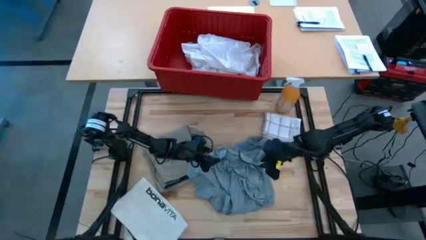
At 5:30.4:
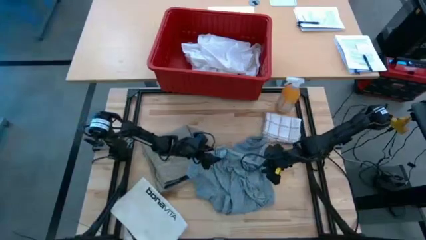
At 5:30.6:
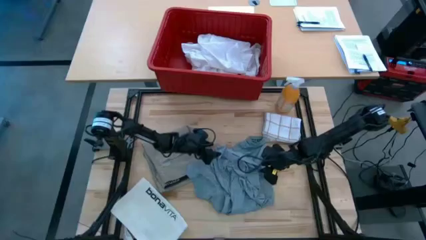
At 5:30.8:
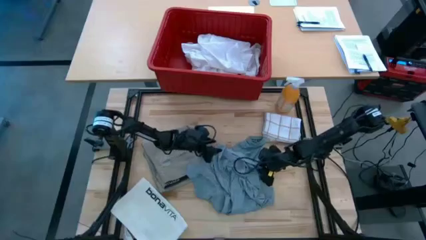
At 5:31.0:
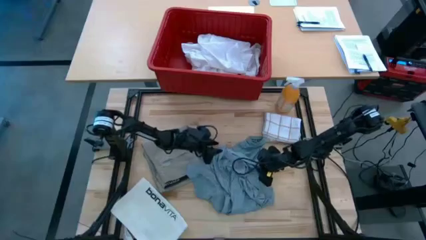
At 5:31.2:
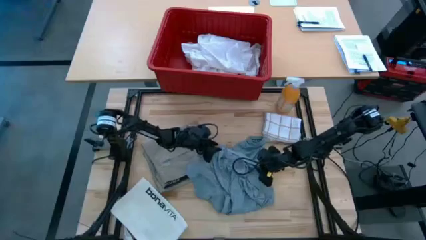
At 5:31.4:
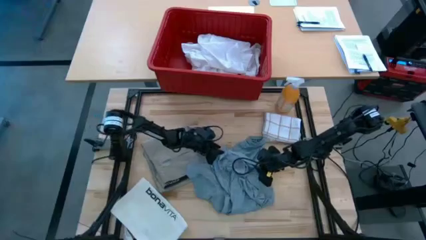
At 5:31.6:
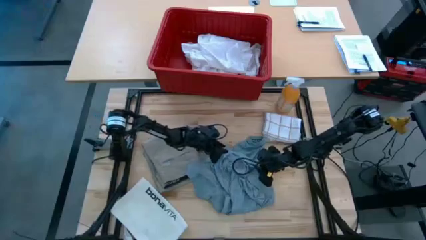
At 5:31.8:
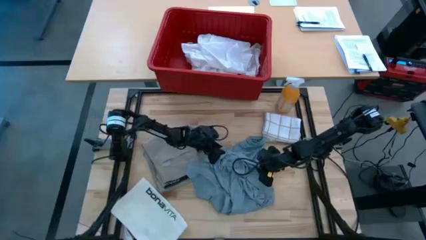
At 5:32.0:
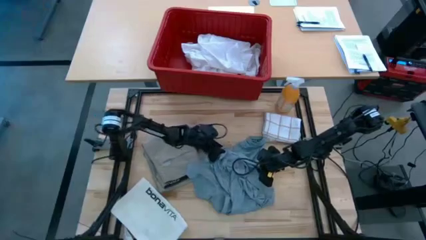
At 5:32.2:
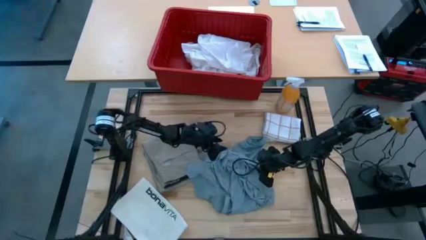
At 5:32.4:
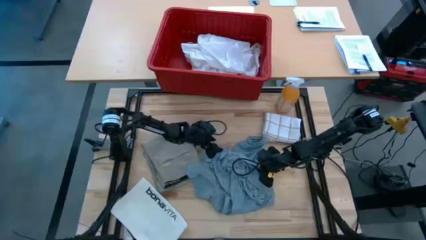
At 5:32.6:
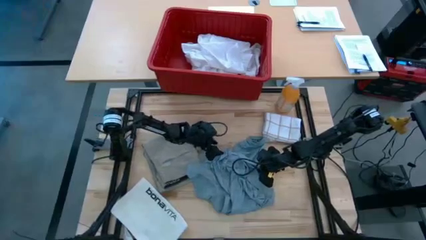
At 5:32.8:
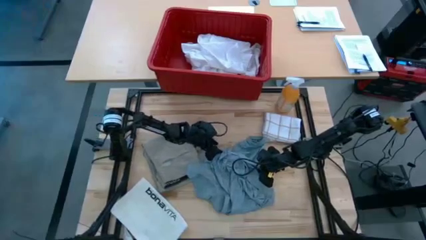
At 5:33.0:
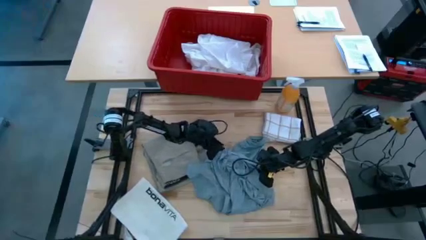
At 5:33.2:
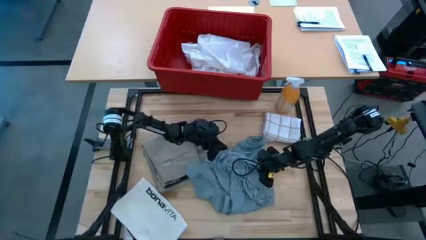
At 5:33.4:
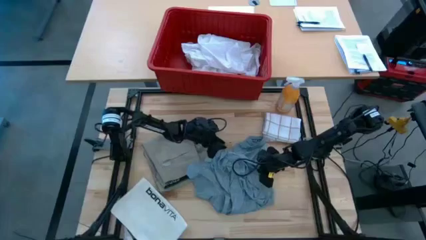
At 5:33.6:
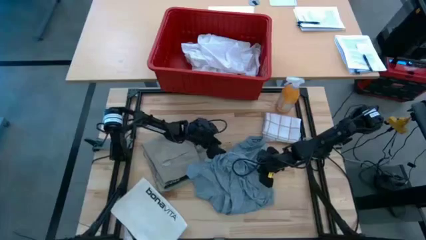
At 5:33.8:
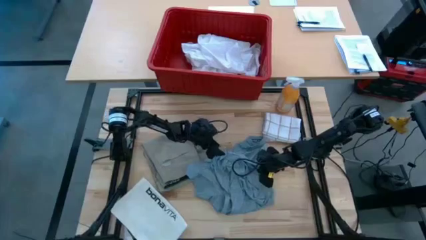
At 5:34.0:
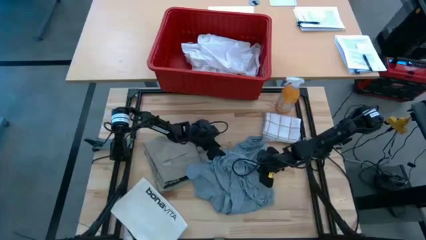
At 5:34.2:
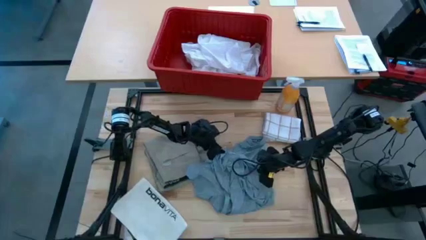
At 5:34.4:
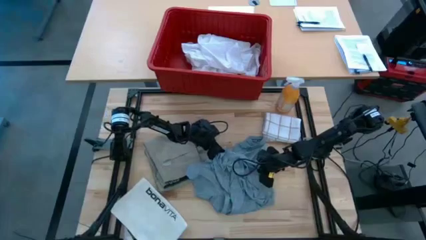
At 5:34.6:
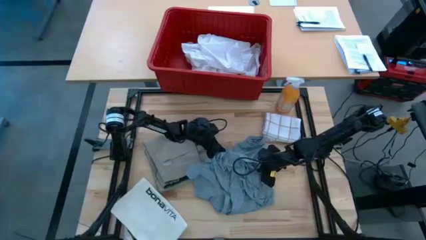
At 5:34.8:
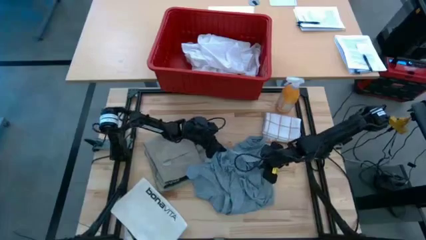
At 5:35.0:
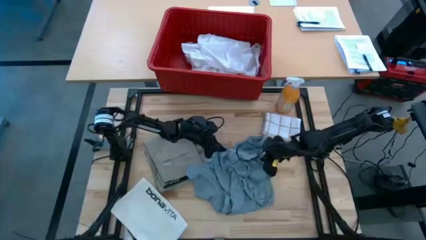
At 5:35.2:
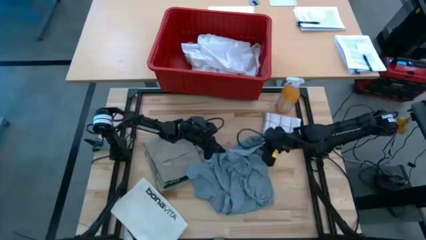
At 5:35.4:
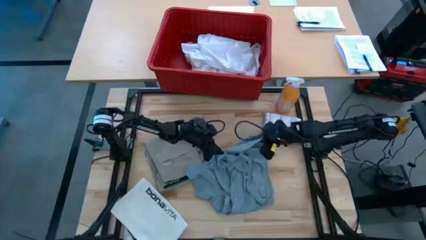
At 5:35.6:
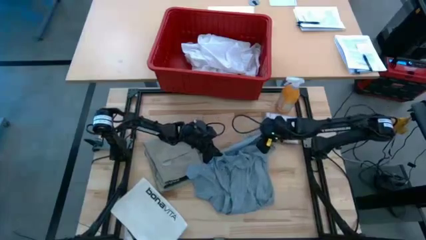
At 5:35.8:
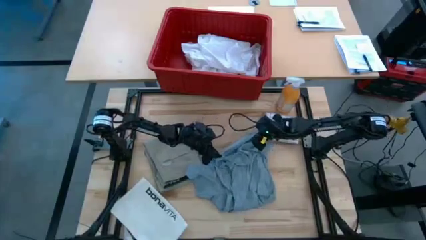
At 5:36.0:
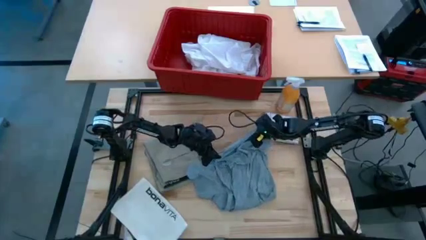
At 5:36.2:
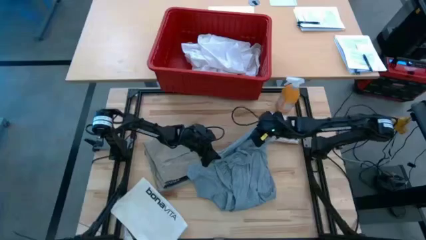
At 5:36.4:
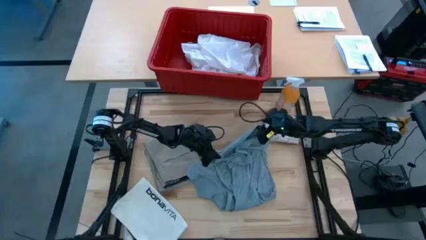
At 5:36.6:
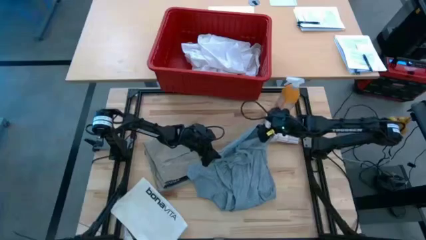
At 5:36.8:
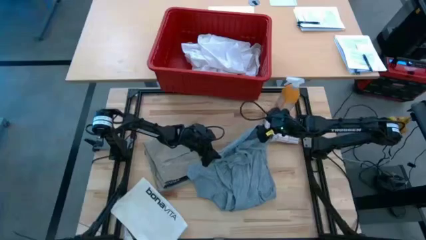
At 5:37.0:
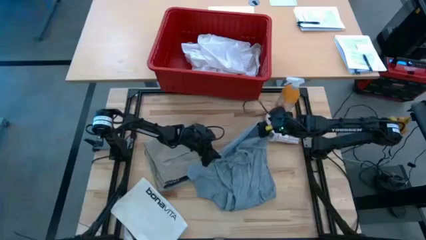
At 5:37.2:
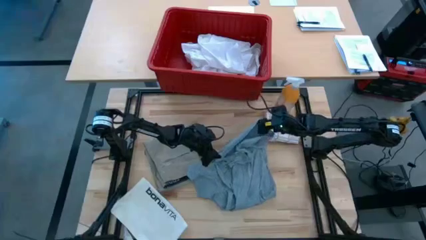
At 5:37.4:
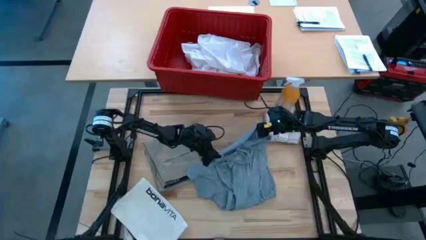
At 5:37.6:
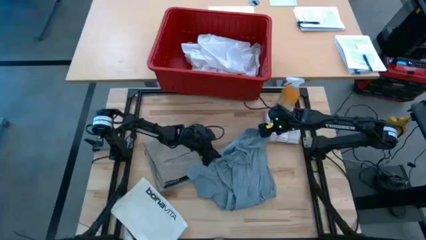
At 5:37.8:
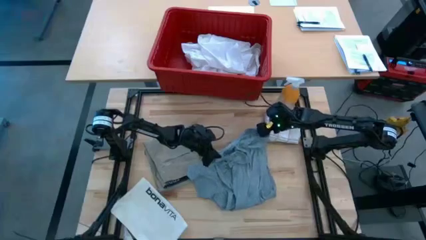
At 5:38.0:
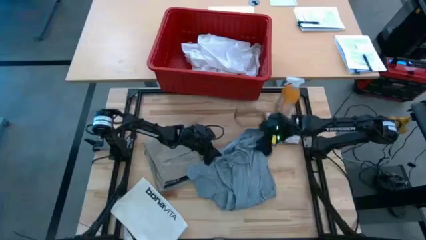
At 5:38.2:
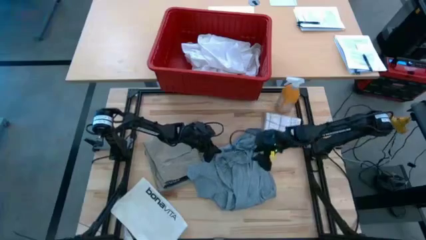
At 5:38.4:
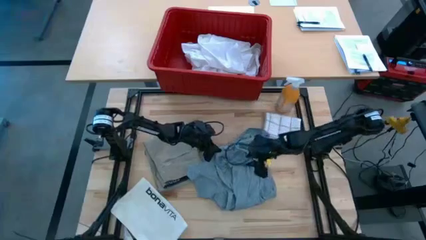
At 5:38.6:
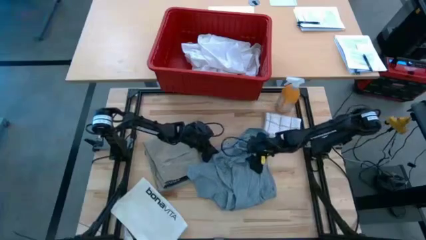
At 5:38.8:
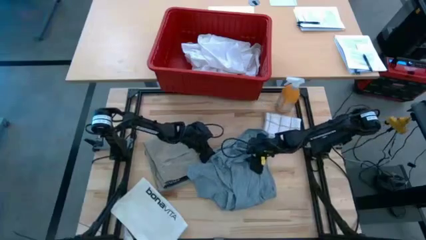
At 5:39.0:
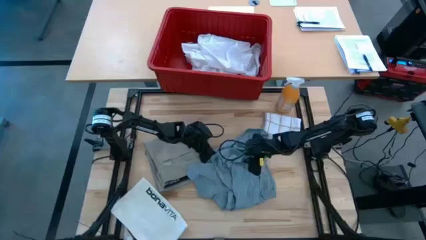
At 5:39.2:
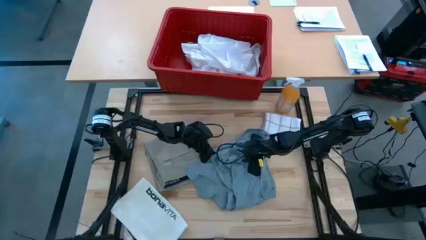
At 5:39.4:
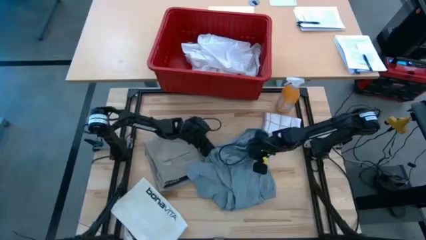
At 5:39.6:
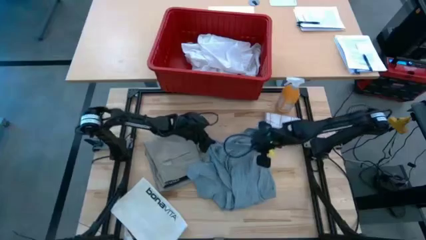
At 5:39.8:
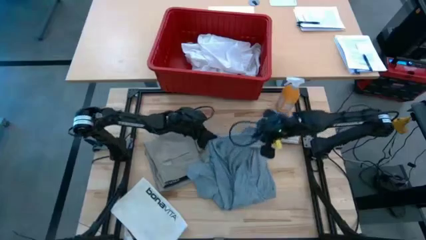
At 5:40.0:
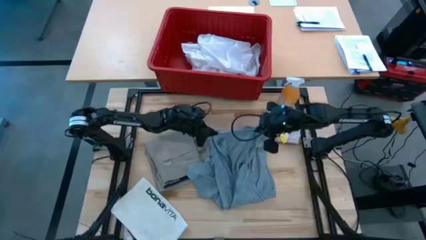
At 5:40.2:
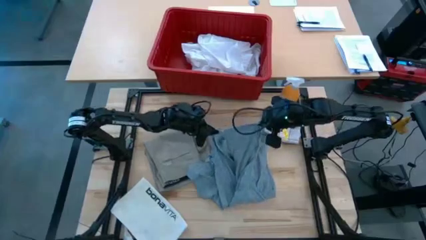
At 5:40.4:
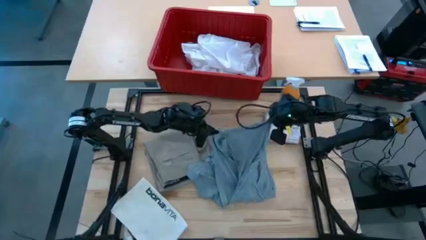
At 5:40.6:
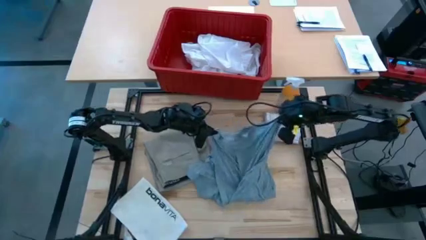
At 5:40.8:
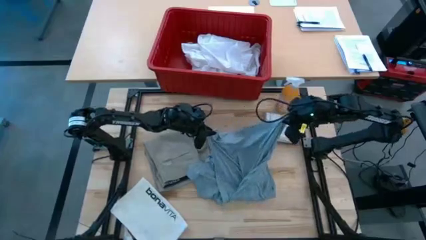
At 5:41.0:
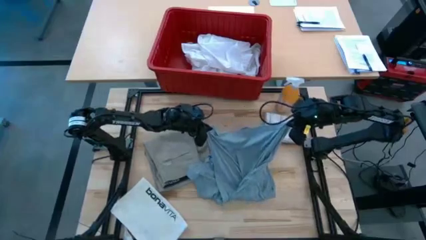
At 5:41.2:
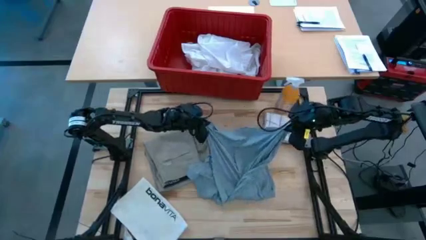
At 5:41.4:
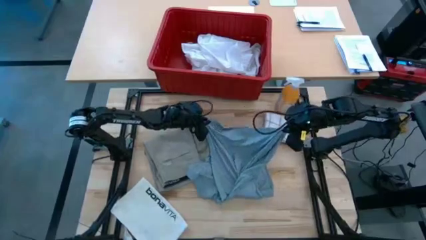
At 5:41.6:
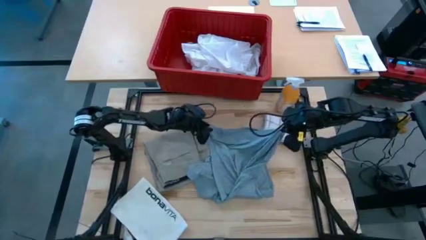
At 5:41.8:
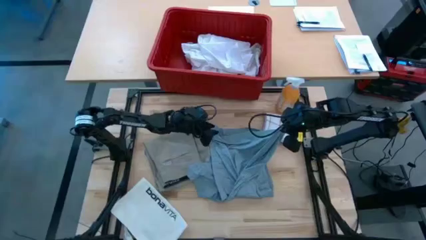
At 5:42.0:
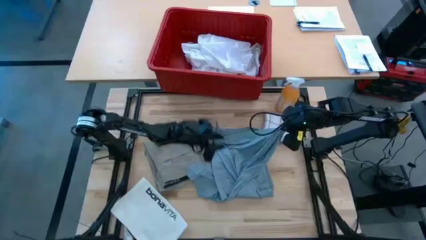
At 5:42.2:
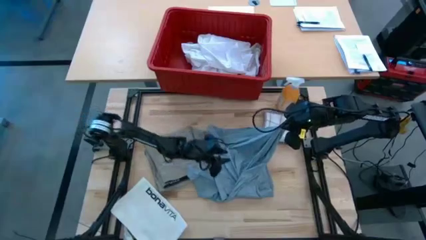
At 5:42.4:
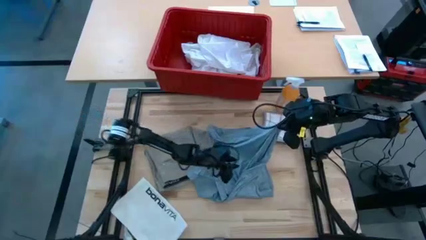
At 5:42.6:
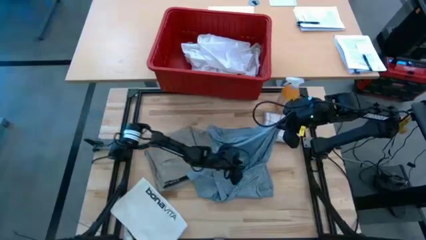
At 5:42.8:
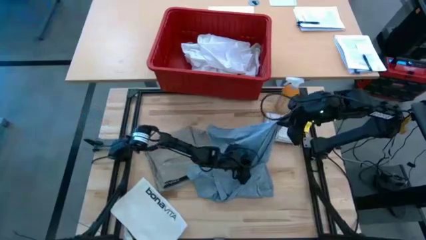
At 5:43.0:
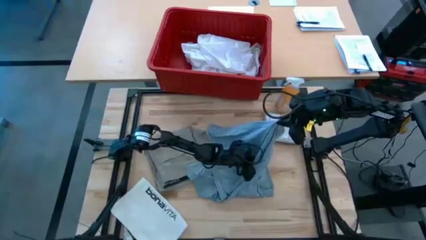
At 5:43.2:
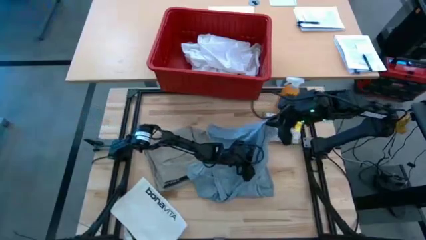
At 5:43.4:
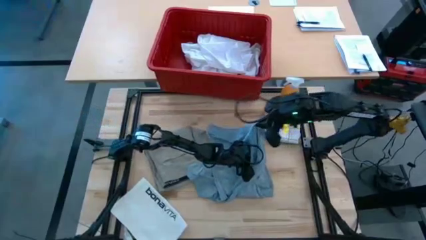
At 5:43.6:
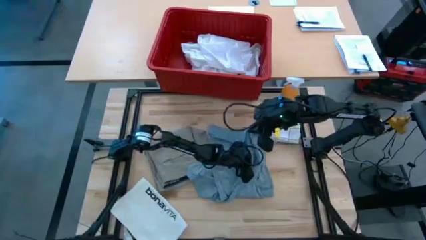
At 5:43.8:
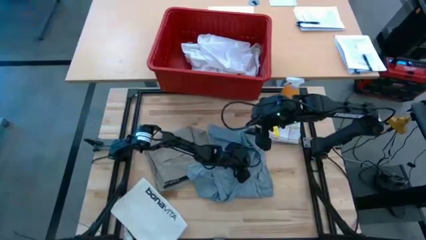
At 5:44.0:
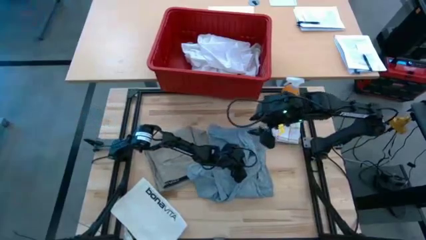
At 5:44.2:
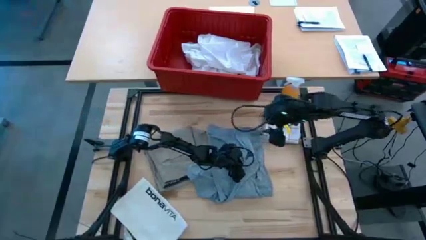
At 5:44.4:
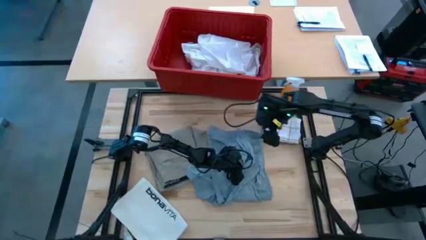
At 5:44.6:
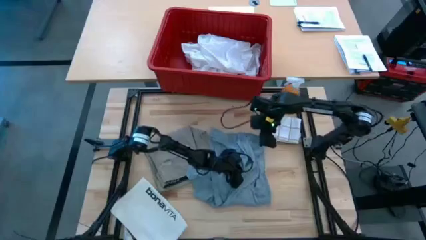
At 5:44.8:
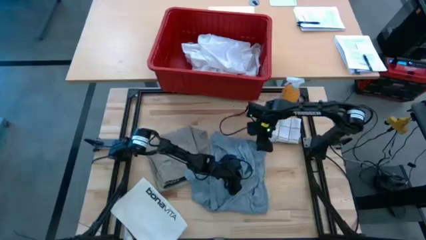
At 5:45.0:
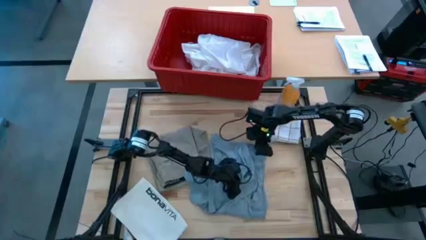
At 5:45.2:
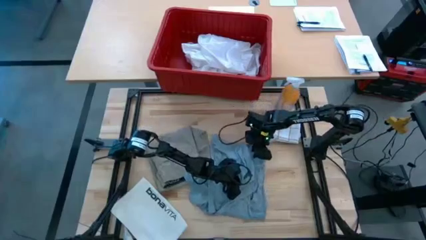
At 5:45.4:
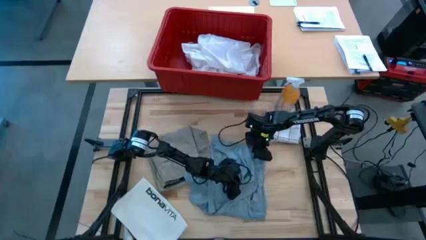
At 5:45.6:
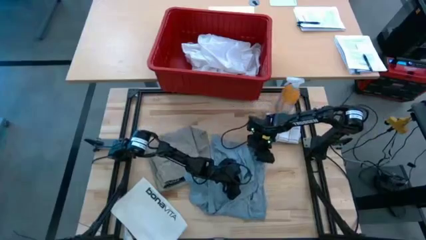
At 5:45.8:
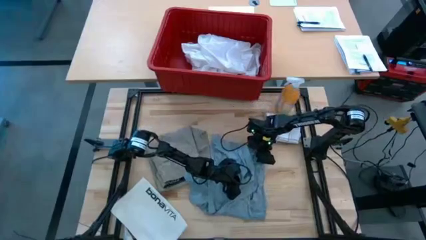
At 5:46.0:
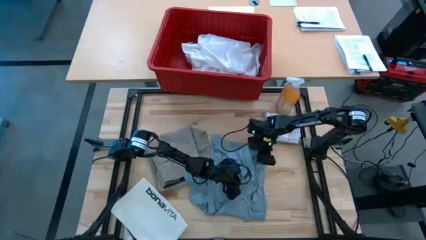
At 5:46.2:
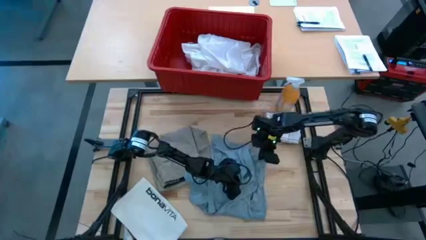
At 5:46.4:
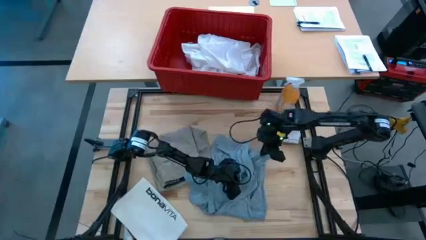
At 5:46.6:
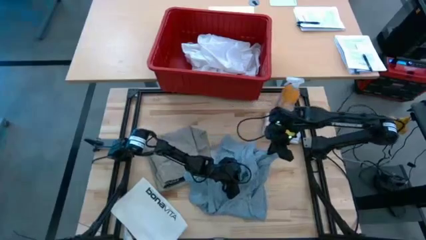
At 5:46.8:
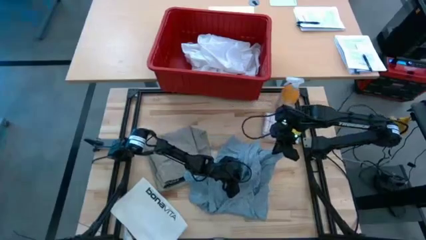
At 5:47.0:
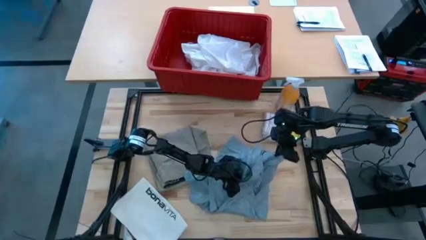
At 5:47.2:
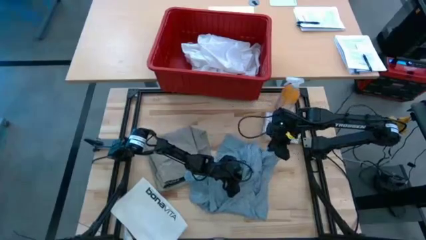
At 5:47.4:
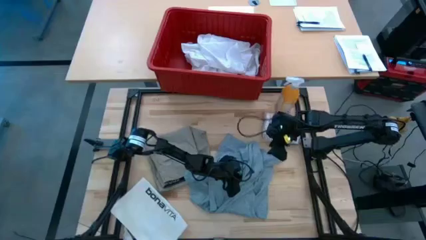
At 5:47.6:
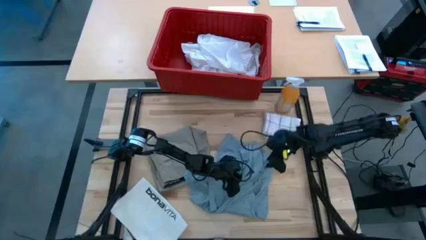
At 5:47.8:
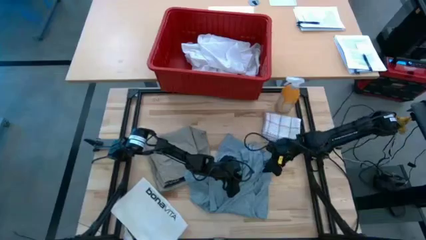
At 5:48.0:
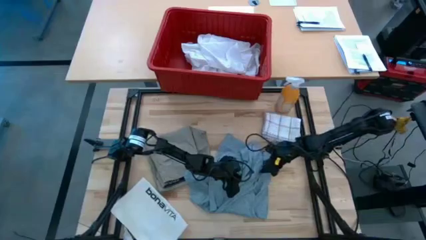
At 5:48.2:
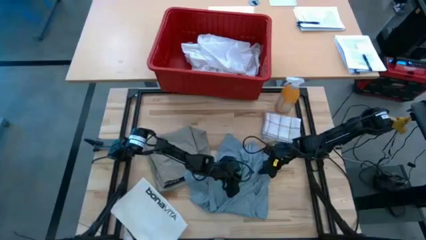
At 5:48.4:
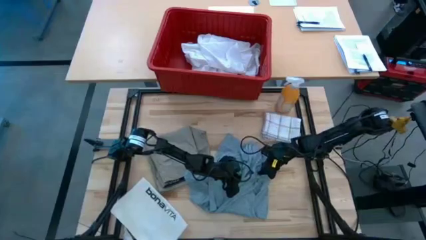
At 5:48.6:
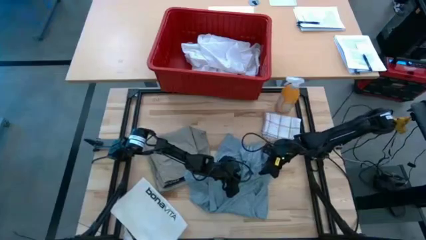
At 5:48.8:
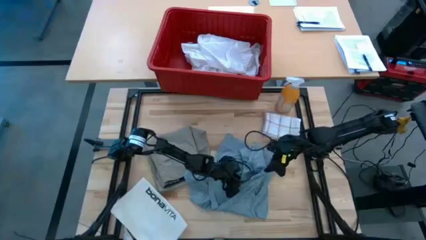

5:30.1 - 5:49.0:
Task: Fold laundry
Fold the gray shirt
